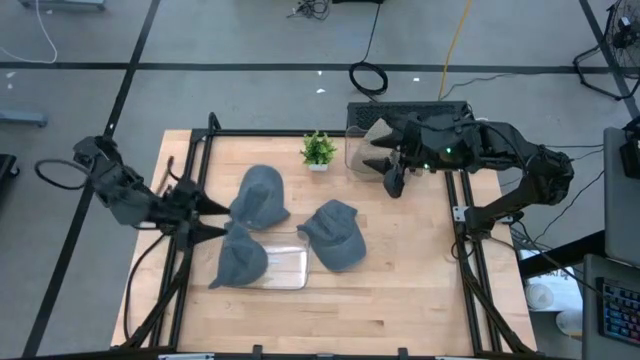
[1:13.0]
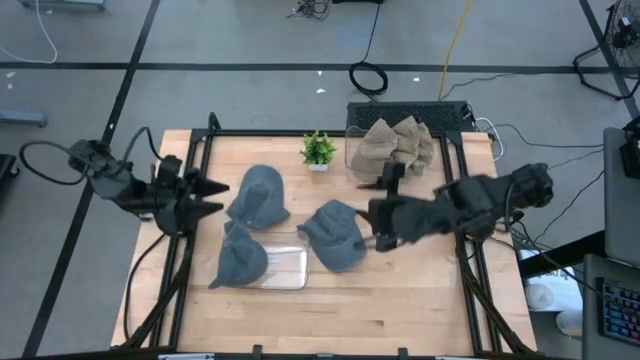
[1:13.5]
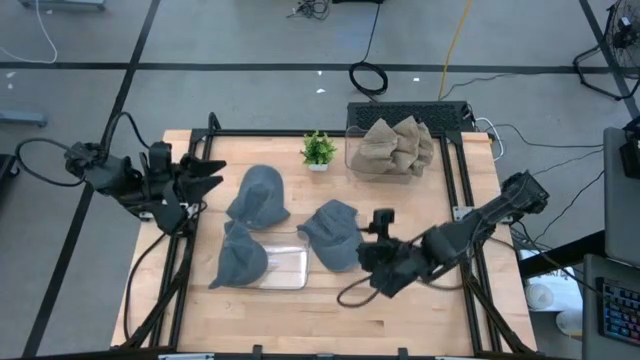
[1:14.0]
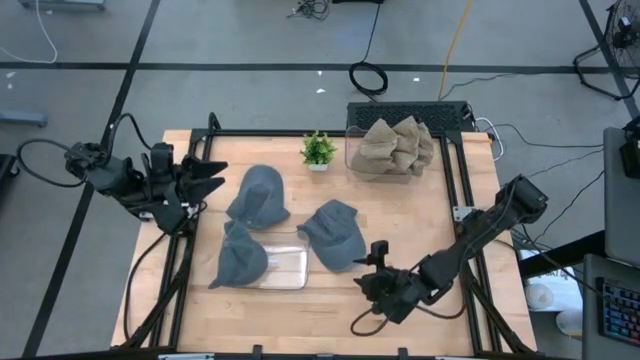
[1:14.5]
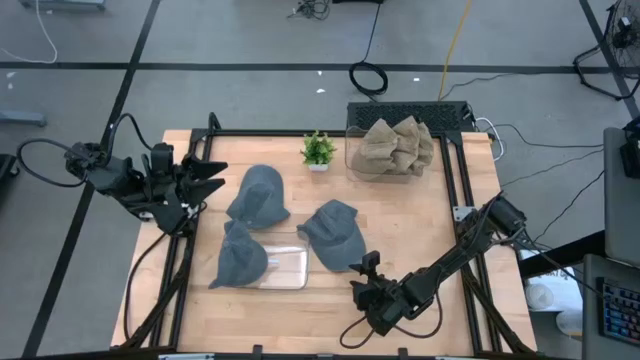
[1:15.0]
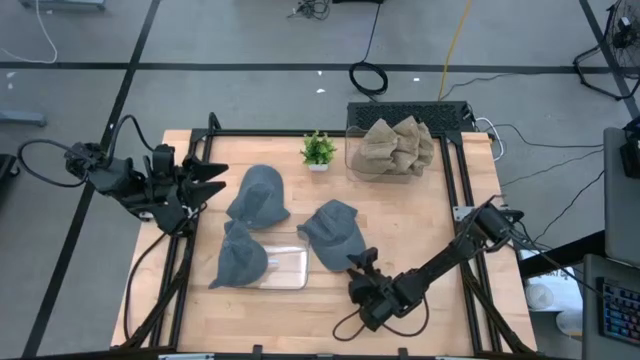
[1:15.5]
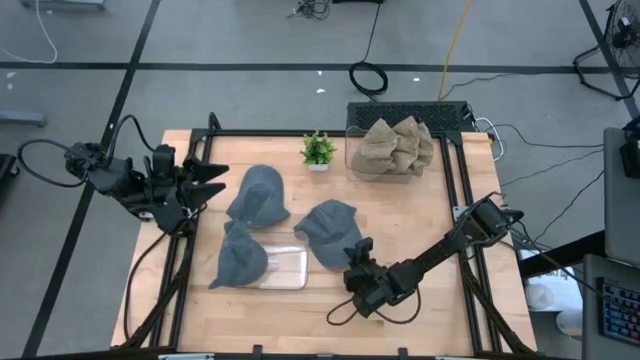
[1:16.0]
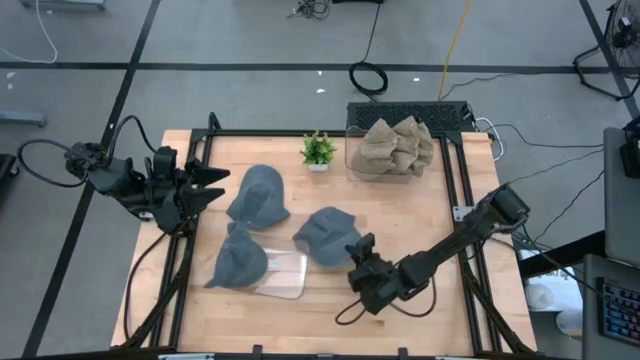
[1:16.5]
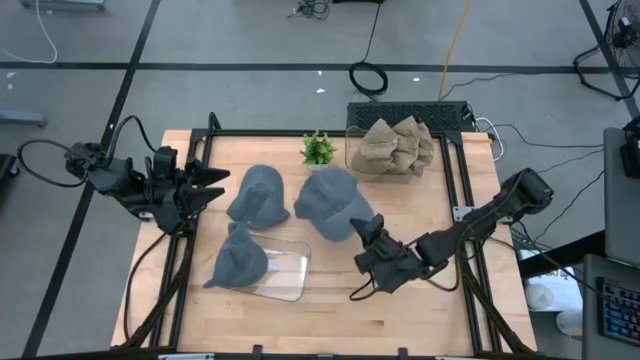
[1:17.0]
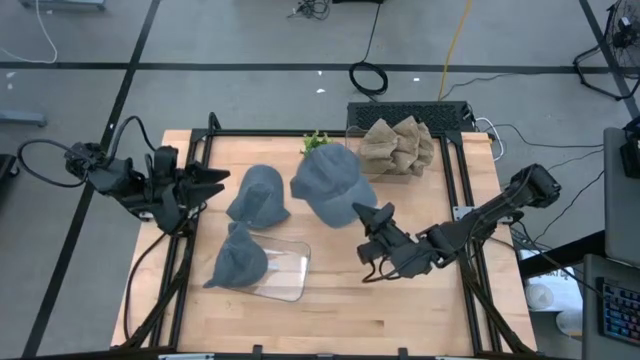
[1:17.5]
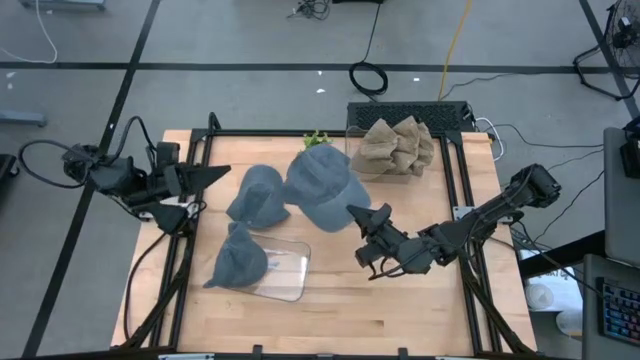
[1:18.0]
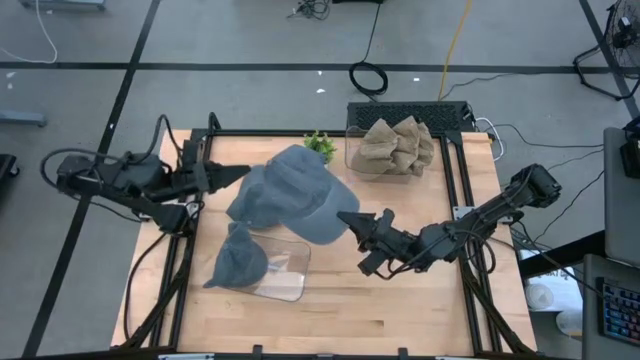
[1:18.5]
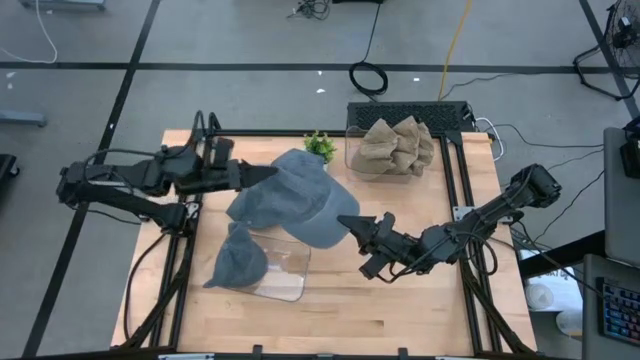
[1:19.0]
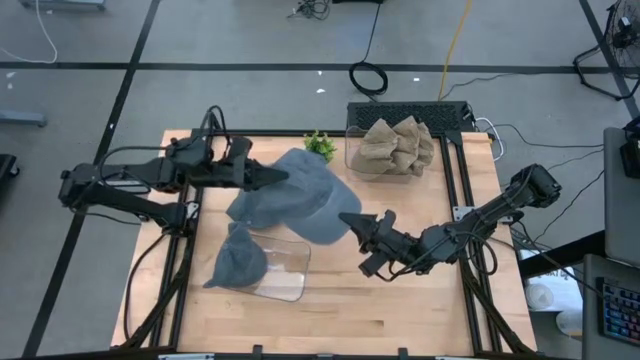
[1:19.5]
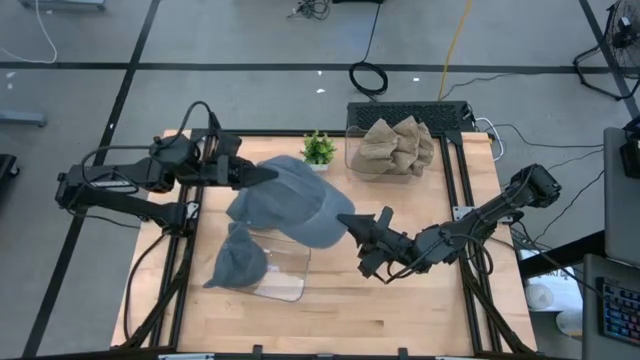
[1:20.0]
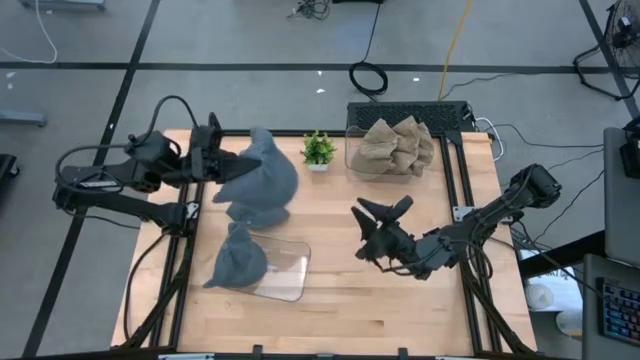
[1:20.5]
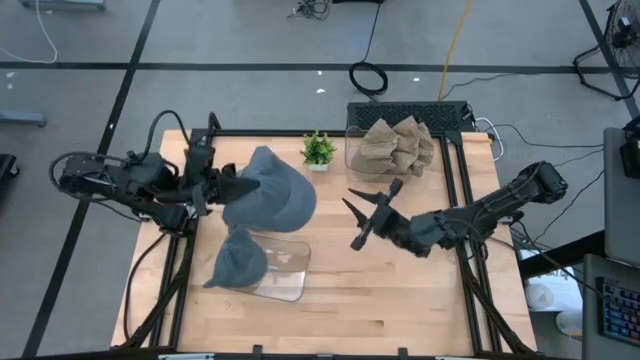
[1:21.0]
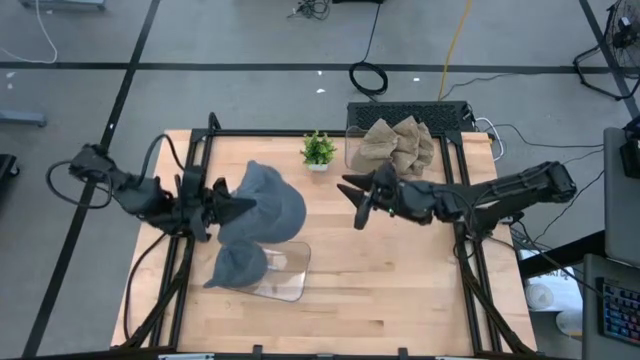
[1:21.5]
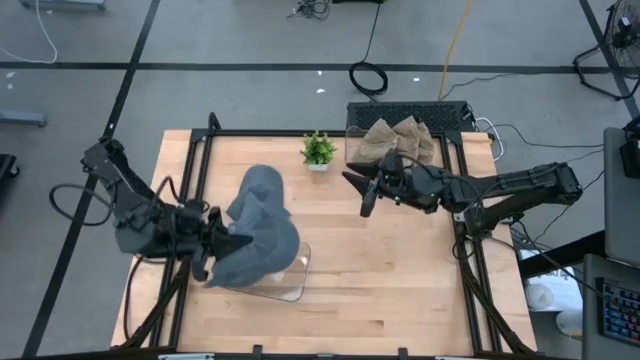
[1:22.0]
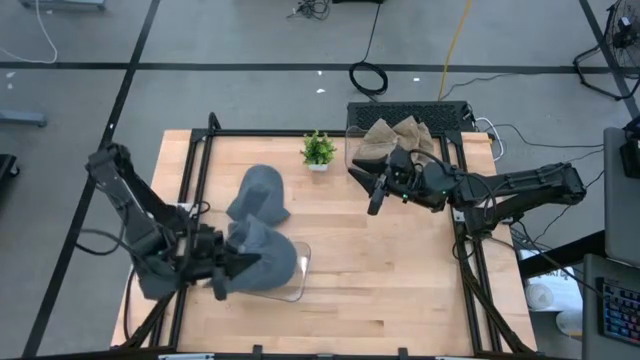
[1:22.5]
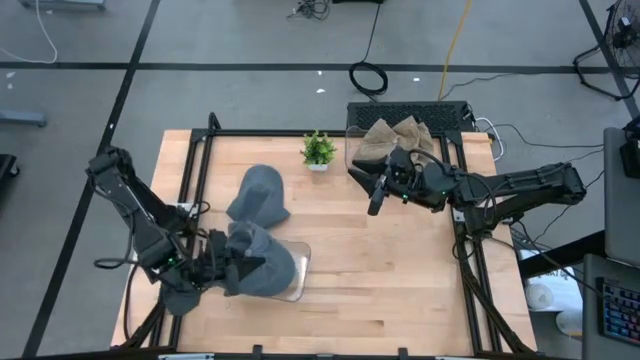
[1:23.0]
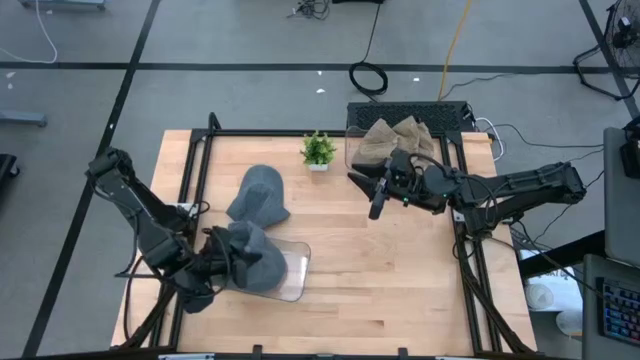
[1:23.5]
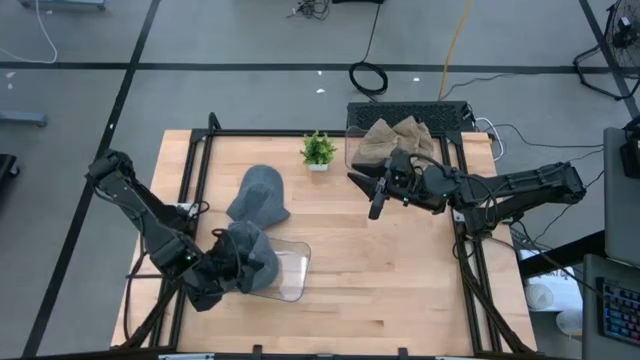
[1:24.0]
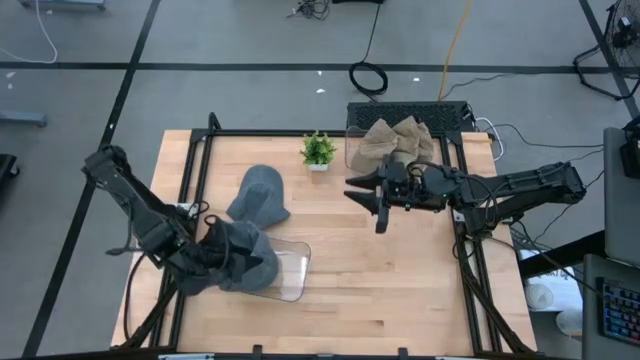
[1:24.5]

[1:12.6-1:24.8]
Task: Pick & Place hat
Put the bottom gray cap into the bottom transparent bin

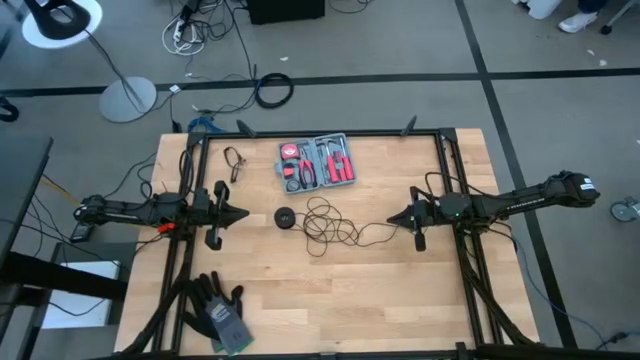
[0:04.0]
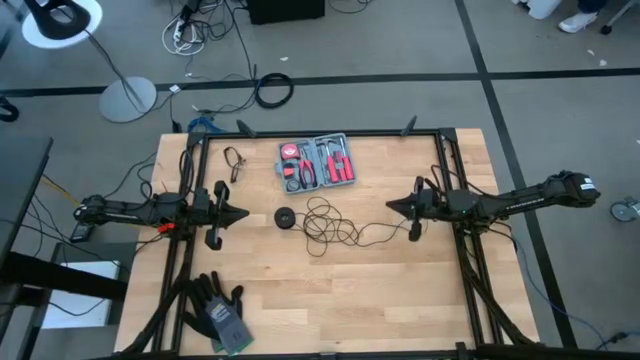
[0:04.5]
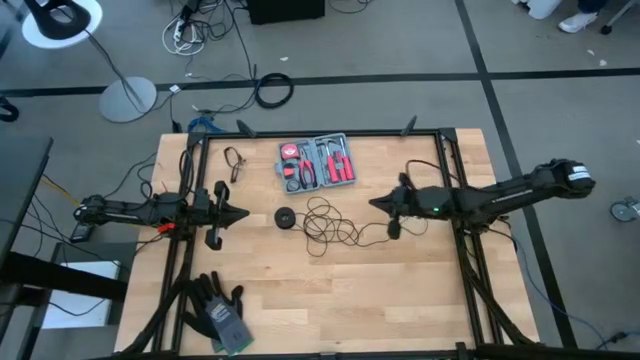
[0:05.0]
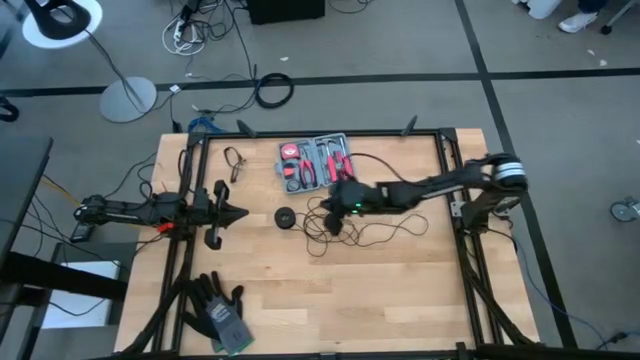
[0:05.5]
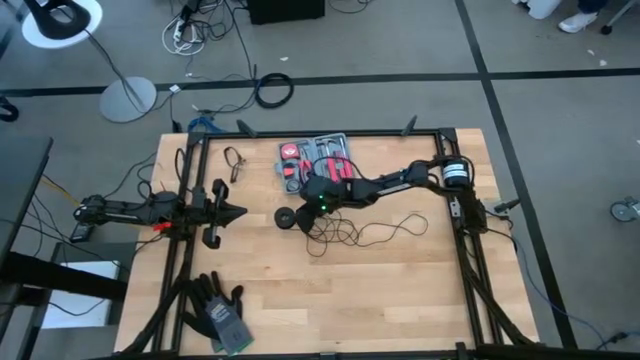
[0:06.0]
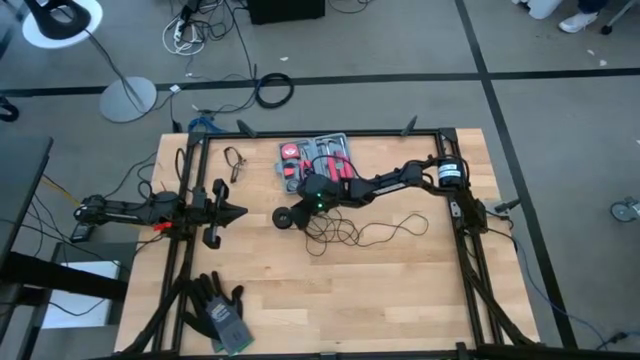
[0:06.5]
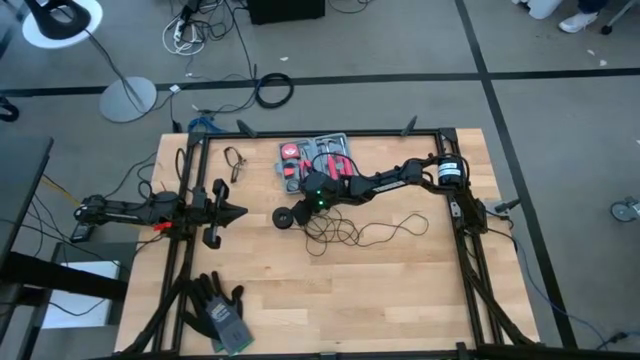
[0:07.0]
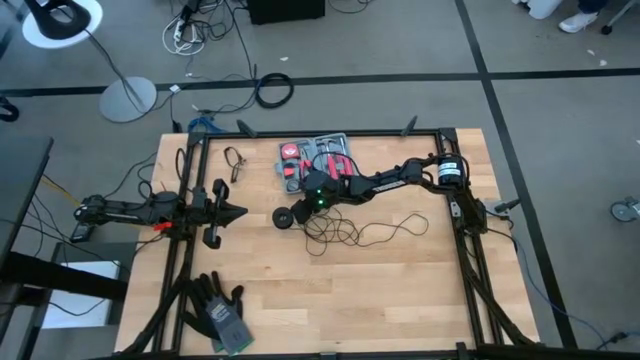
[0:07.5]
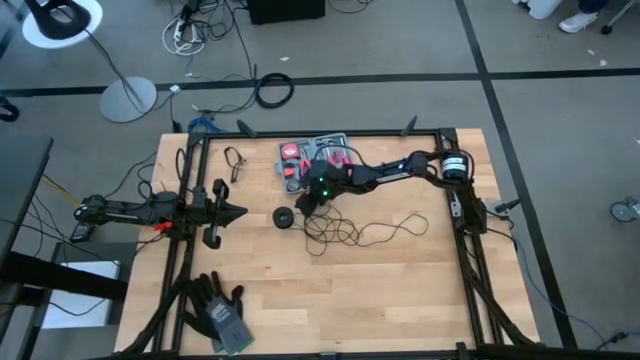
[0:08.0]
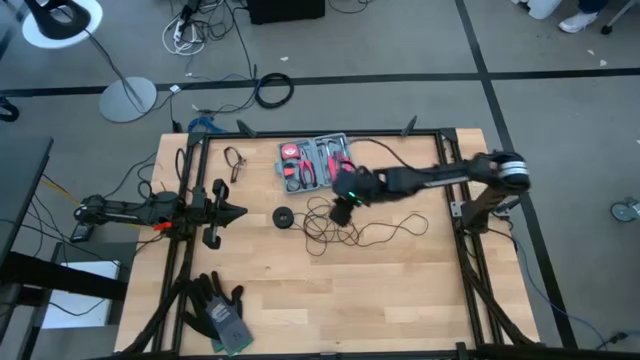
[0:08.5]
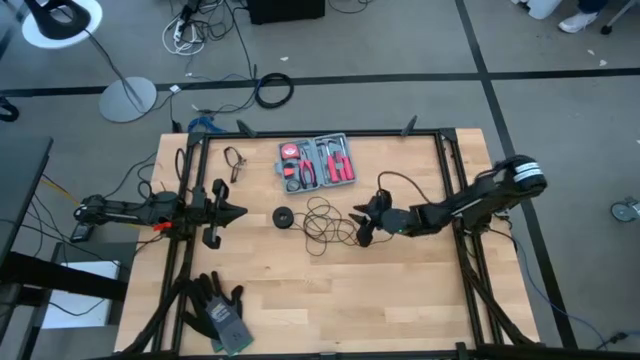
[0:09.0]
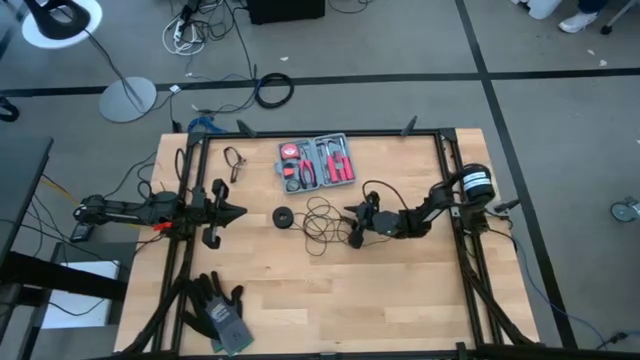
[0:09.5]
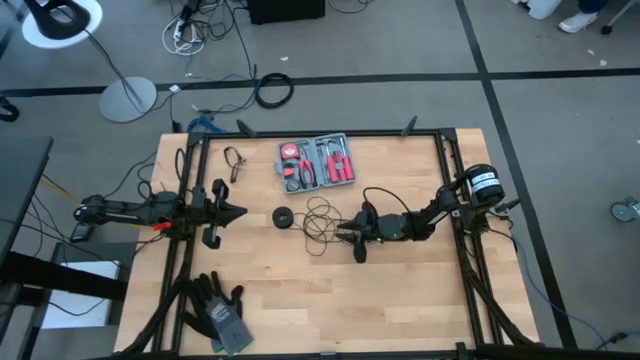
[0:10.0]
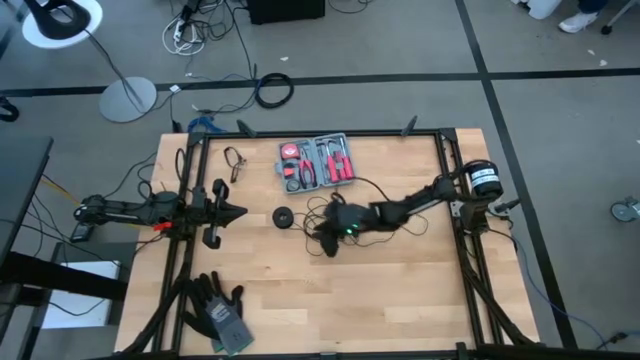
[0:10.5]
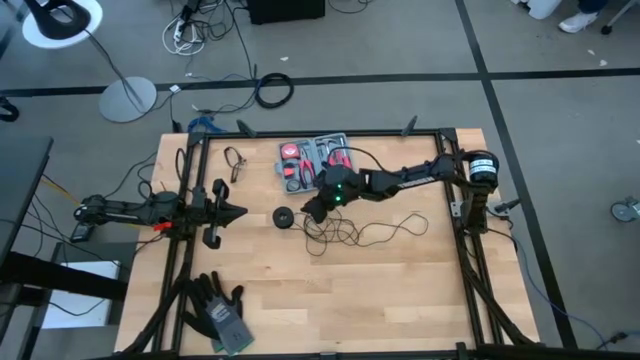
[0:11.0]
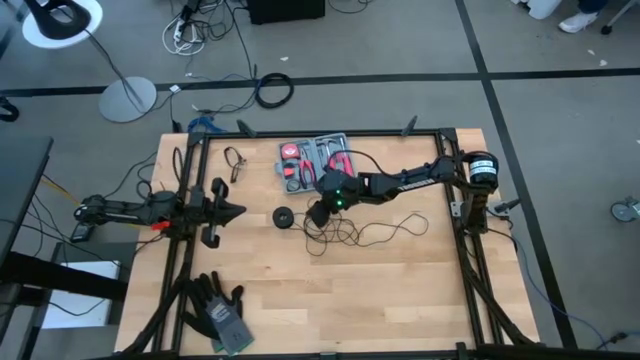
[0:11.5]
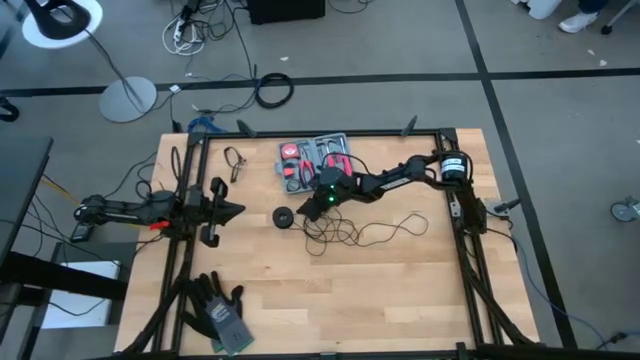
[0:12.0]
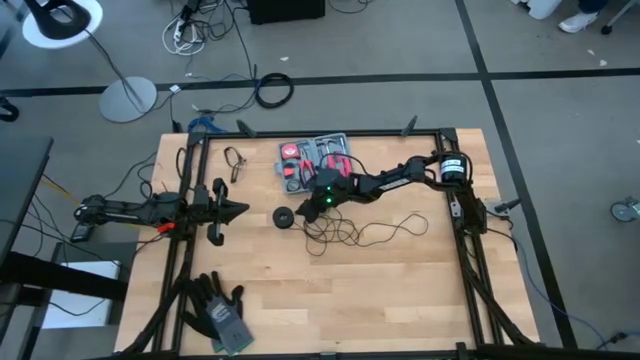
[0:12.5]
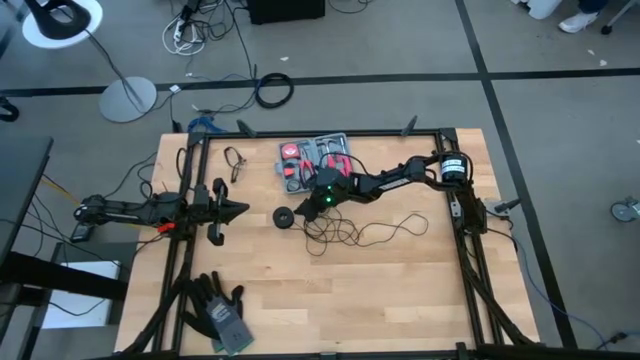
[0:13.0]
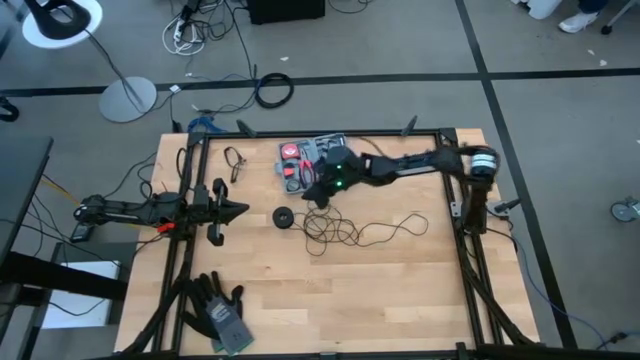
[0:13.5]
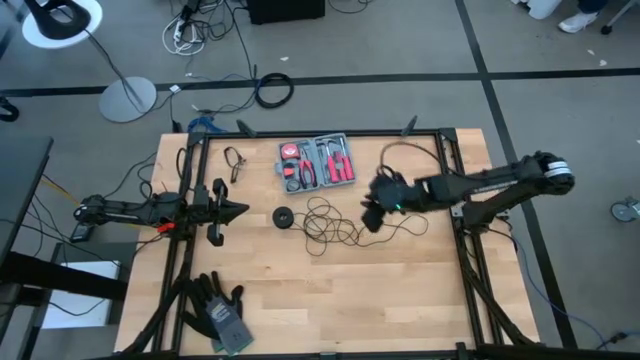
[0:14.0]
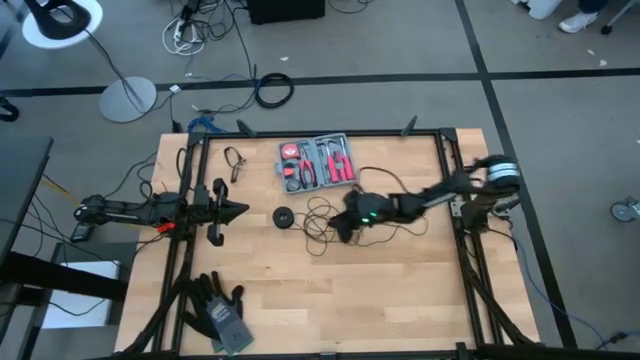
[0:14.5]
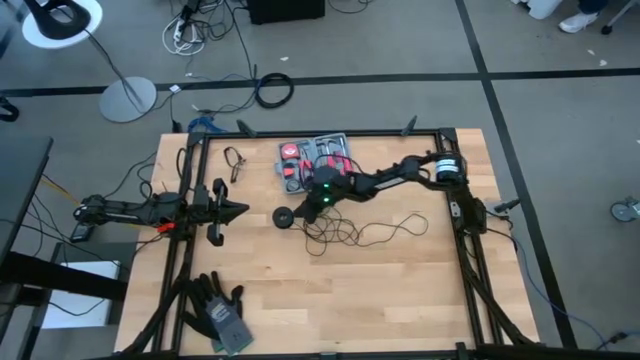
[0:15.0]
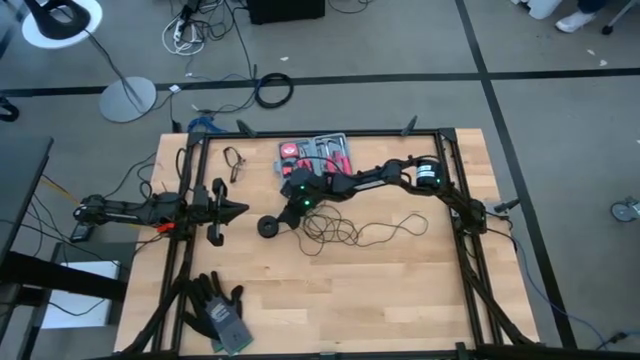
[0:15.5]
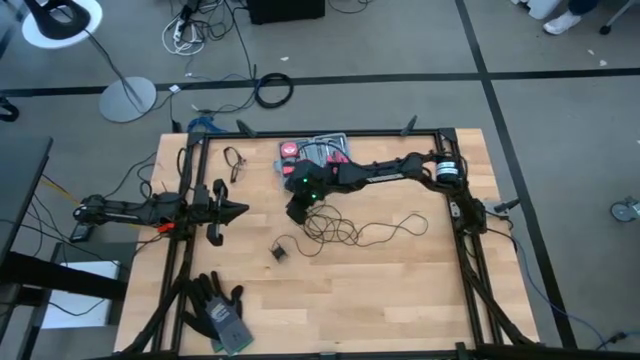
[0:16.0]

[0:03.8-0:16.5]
Task: Coil cords
Coil the black wire onto the black spool
